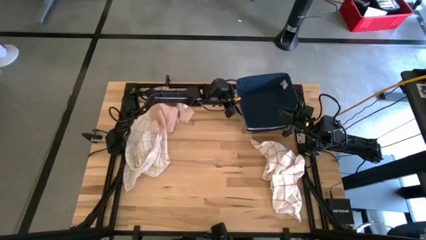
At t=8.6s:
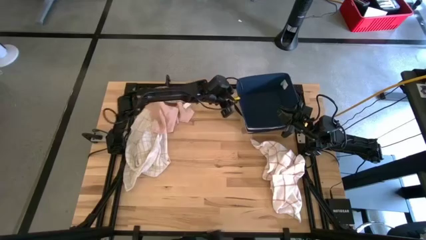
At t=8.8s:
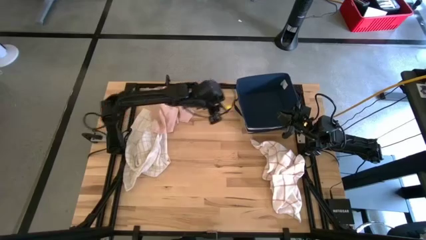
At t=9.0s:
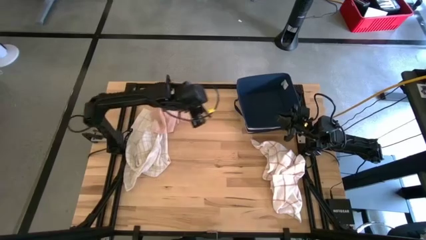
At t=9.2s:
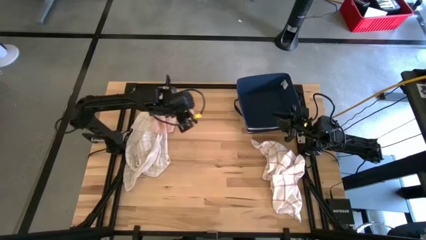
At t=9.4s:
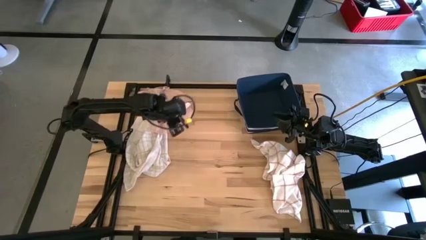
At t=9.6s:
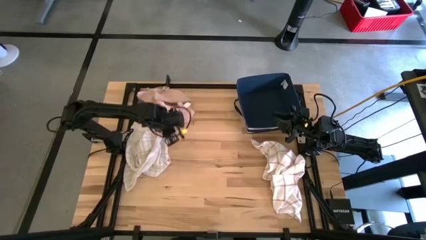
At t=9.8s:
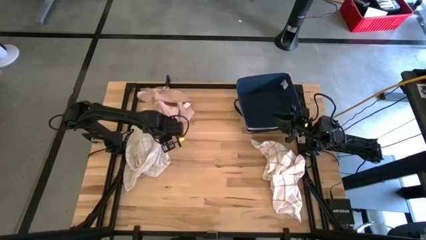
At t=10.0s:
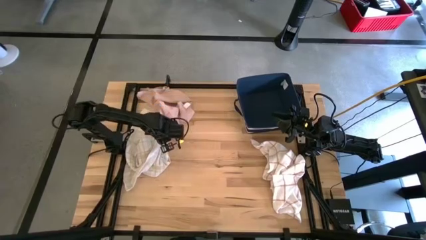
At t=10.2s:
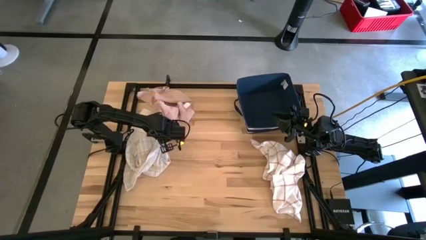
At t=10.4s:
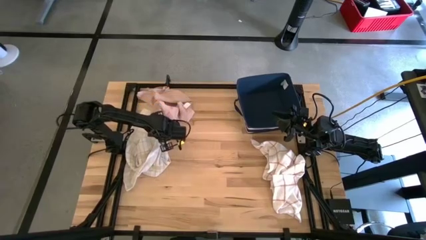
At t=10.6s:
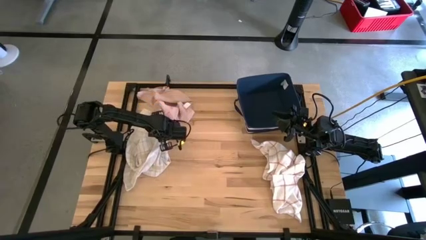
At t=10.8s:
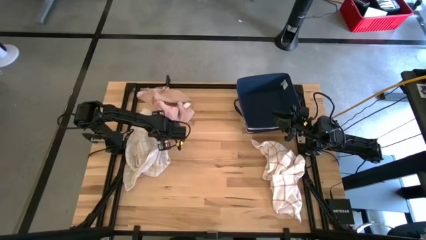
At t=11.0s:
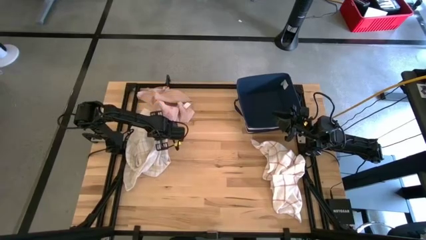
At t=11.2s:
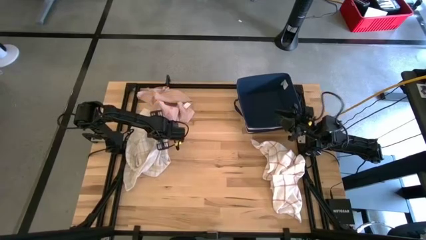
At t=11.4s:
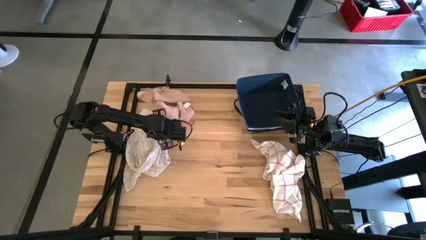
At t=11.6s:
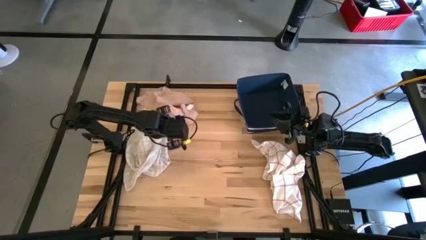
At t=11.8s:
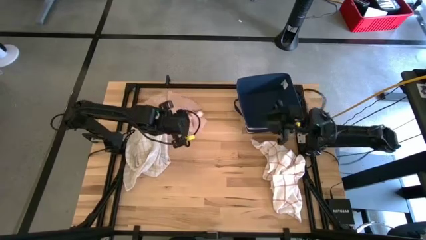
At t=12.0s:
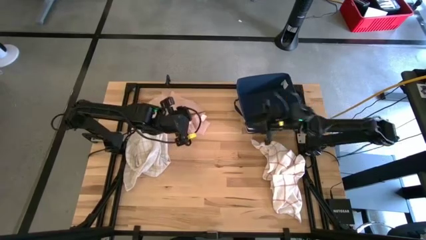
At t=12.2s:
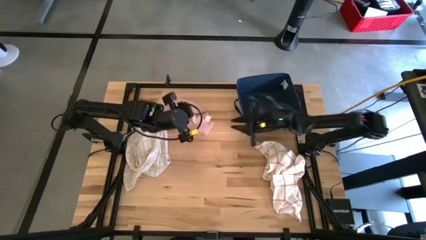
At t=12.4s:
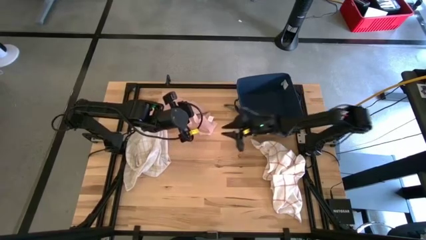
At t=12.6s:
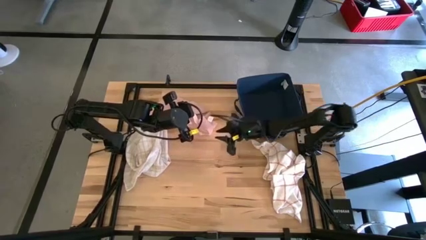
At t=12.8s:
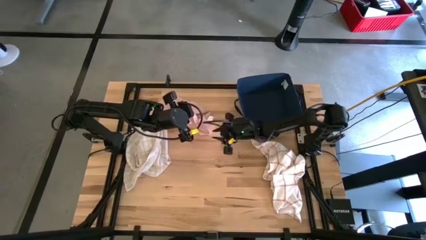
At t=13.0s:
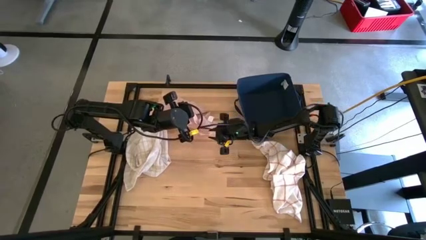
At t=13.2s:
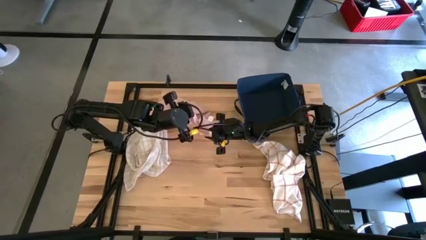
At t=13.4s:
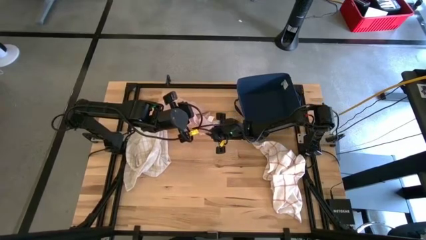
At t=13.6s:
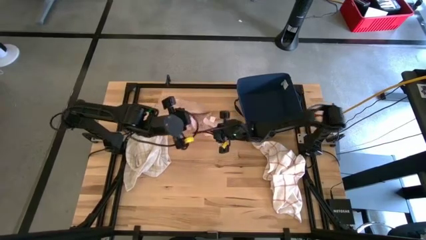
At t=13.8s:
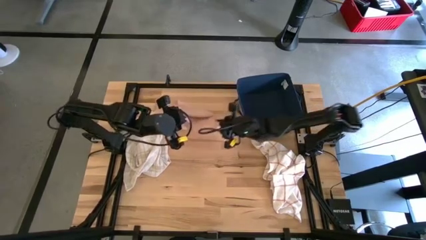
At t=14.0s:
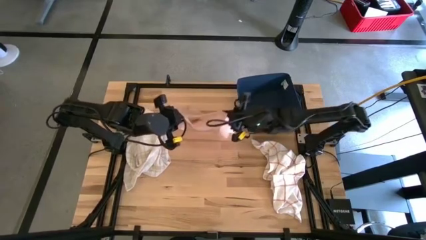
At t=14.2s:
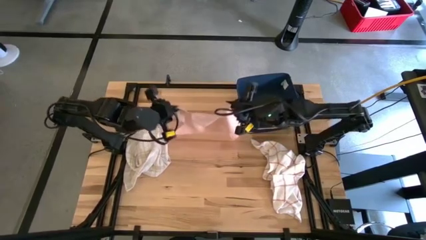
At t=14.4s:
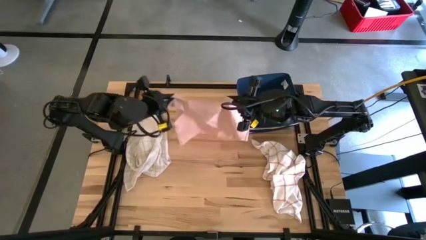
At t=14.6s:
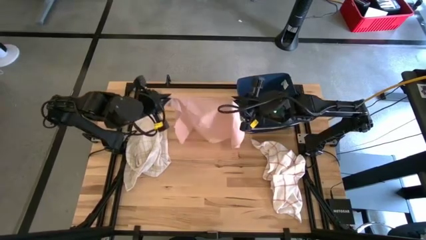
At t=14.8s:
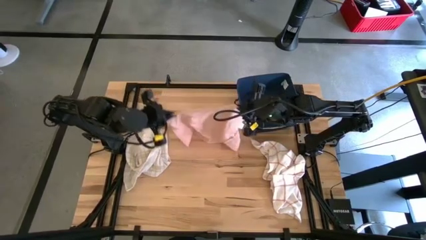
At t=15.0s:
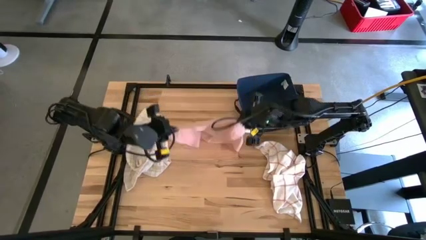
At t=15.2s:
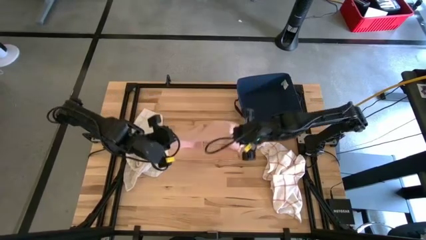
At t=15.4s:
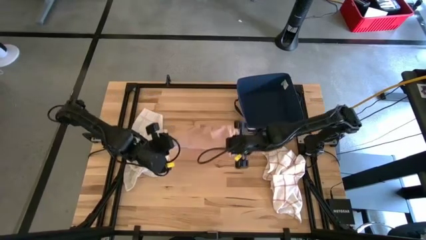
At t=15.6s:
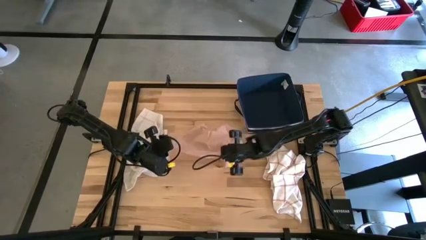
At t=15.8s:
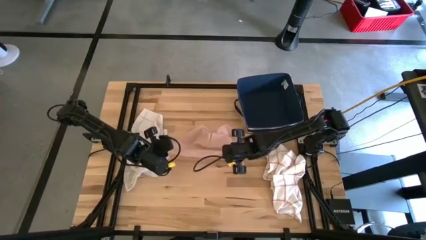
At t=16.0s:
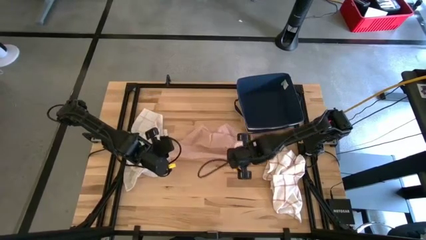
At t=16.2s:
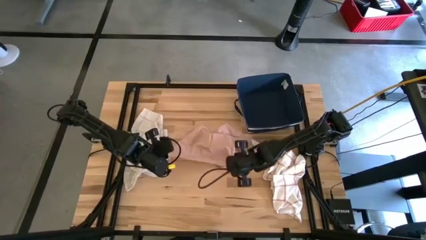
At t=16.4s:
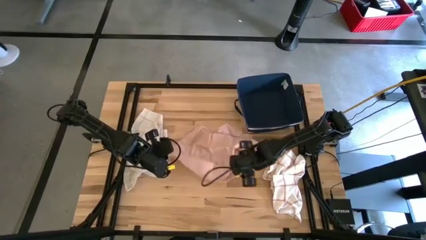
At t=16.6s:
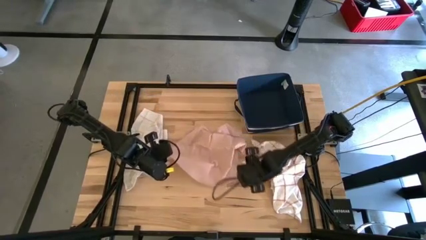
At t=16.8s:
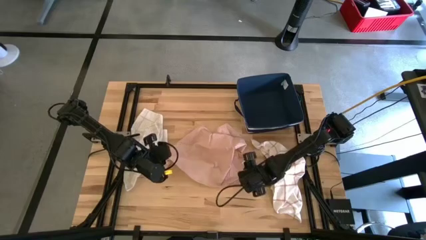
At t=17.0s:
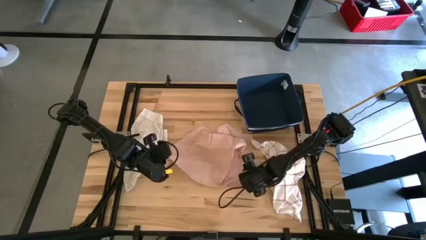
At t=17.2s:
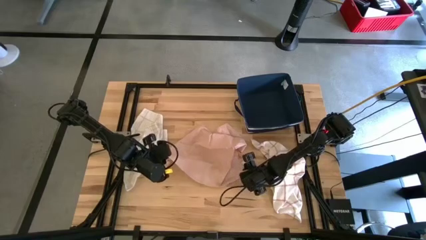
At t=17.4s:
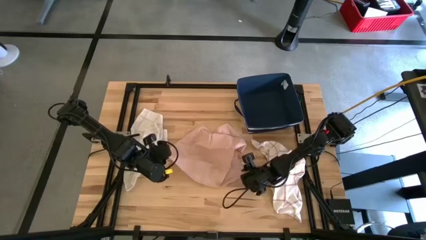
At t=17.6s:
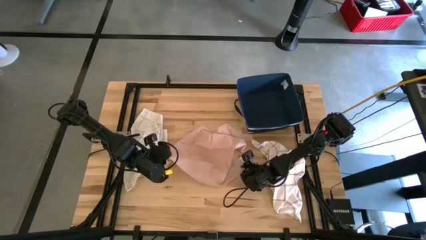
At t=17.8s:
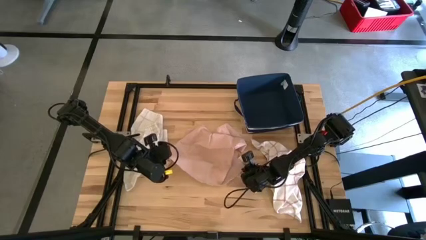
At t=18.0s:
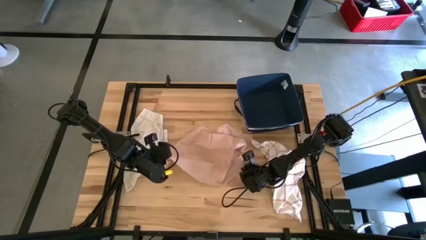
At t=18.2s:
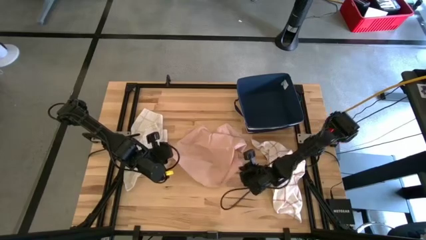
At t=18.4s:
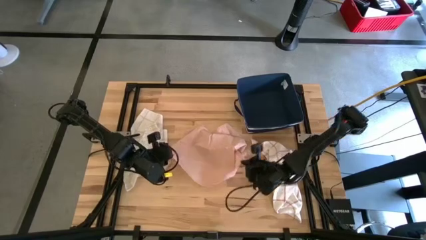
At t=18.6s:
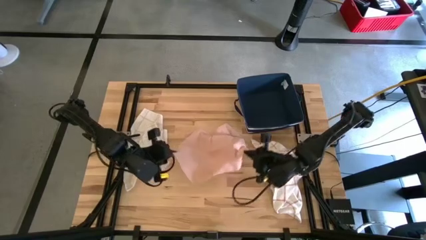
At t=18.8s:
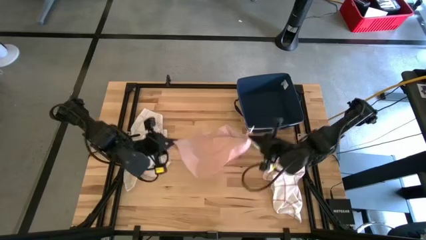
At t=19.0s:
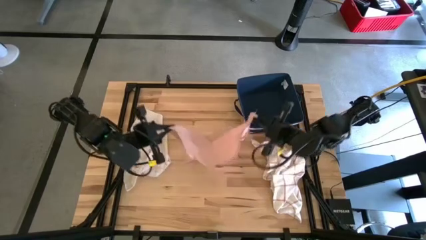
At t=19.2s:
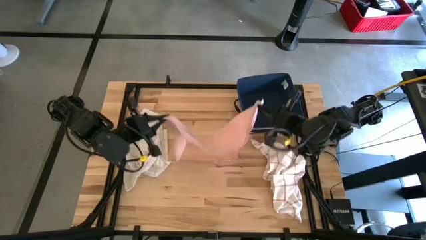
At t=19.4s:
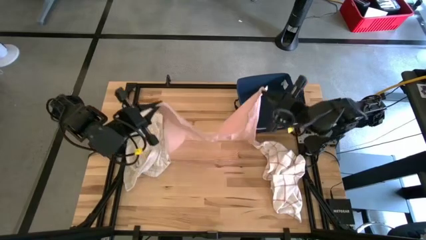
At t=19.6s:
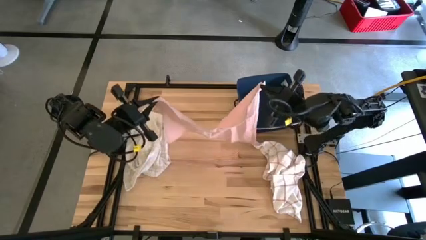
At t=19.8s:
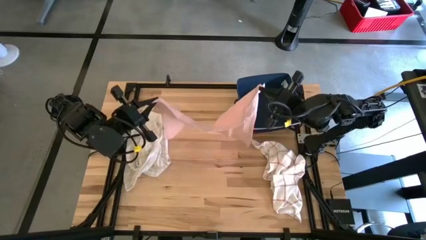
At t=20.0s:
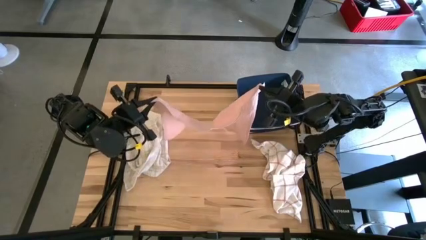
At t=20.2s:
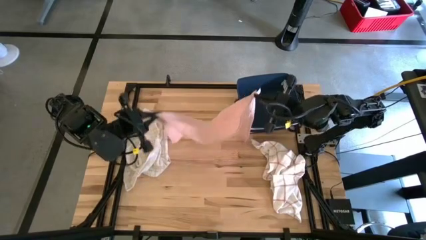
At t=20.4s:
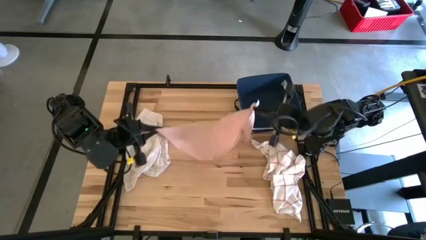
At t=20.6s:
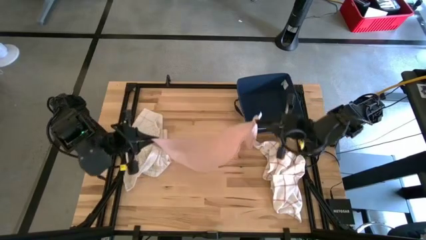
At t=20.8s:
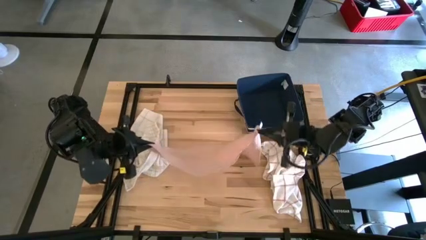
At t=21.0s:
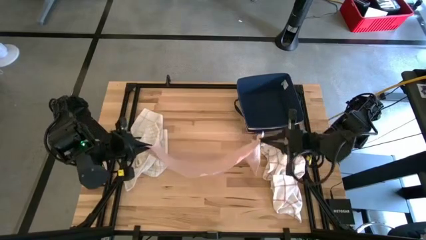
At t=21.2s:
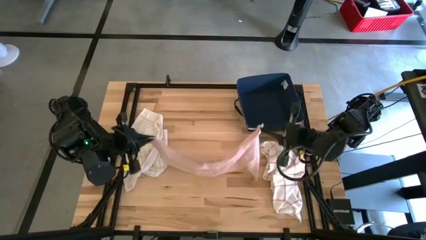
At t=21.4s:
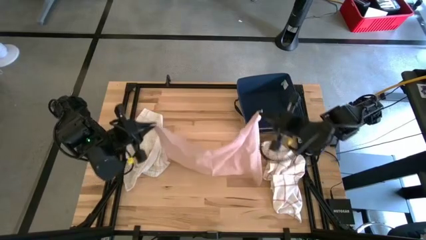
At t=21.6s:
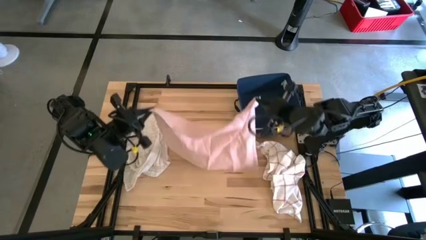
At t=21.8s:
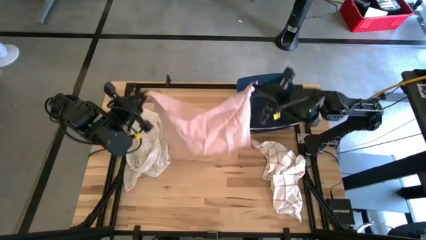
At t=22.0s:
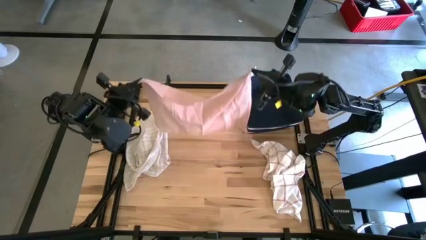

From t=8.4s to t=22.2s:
Task: Fold towel
Fold the pink towel
